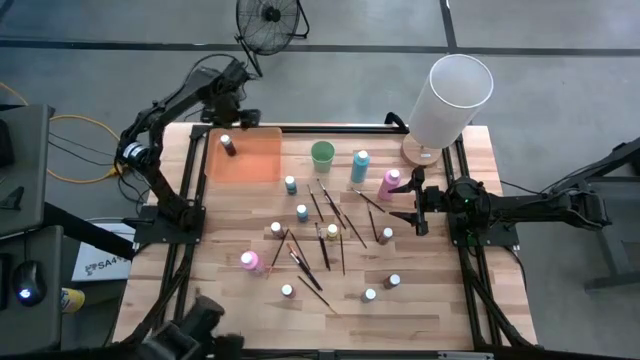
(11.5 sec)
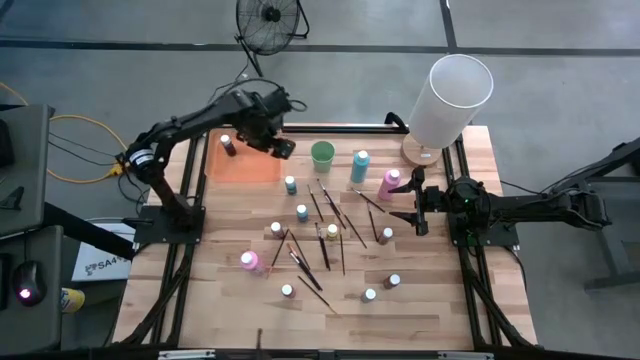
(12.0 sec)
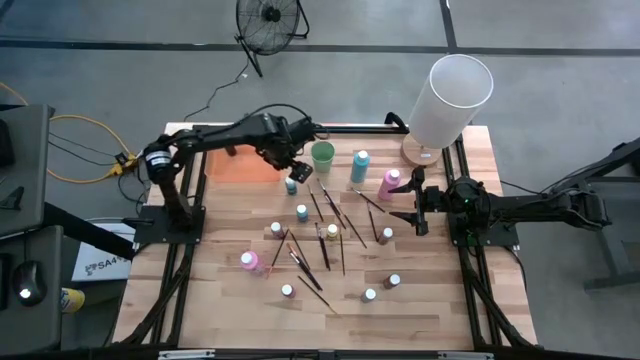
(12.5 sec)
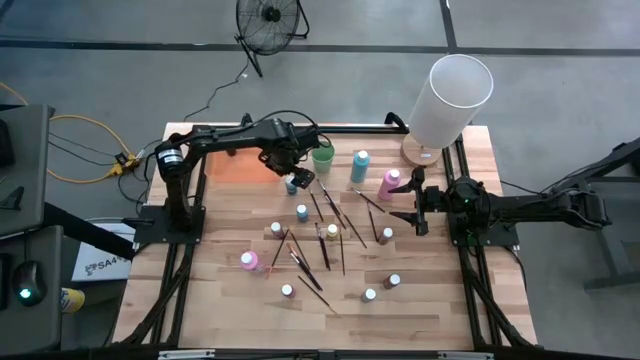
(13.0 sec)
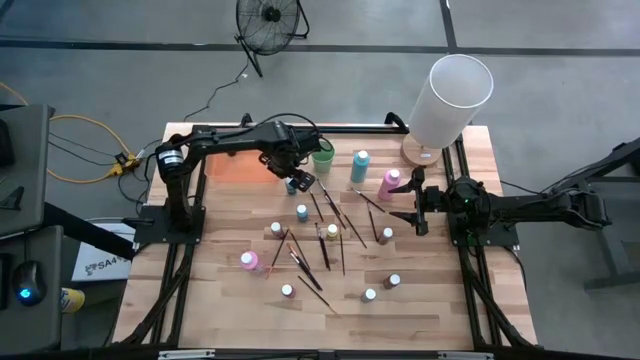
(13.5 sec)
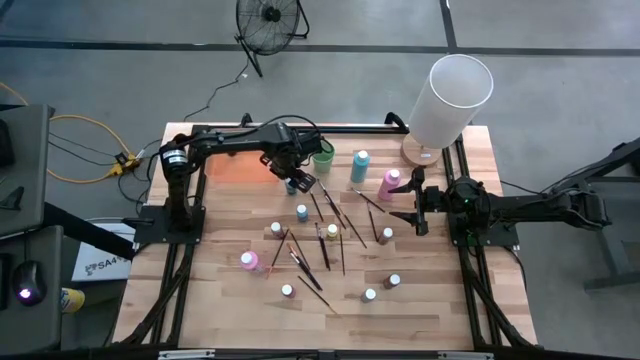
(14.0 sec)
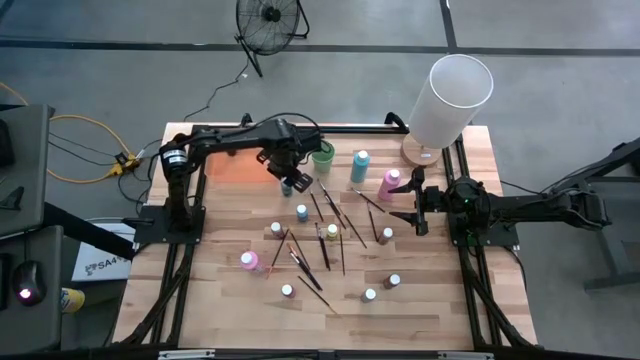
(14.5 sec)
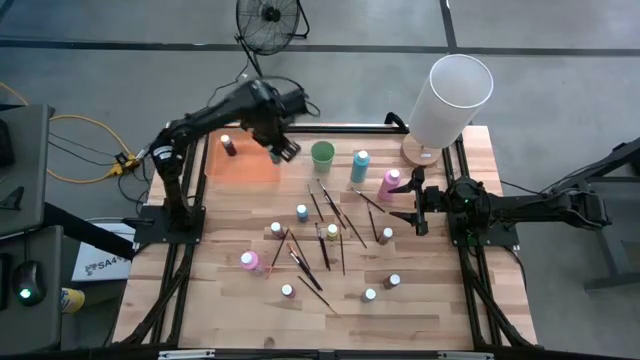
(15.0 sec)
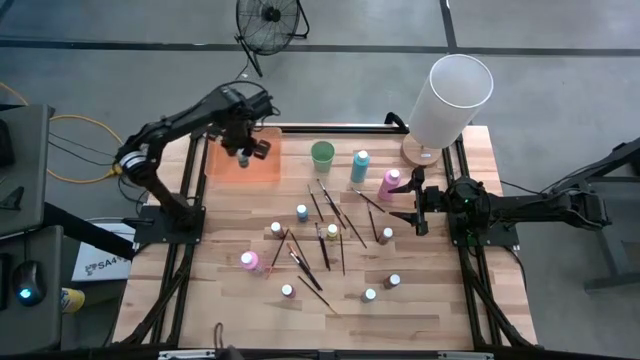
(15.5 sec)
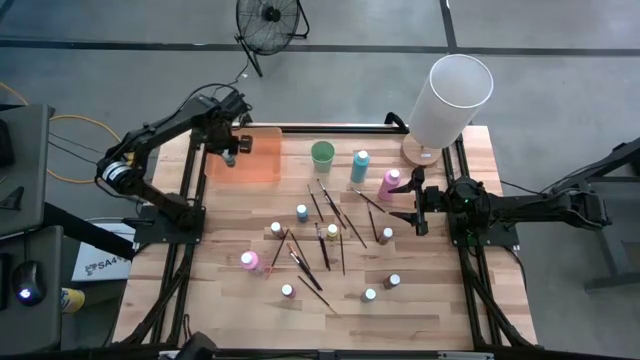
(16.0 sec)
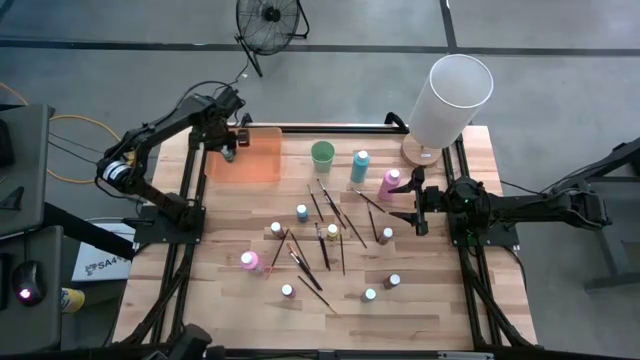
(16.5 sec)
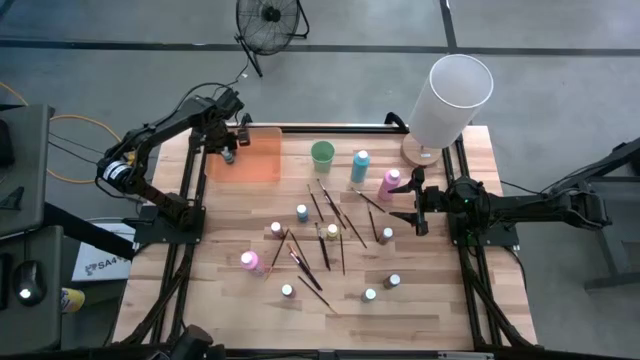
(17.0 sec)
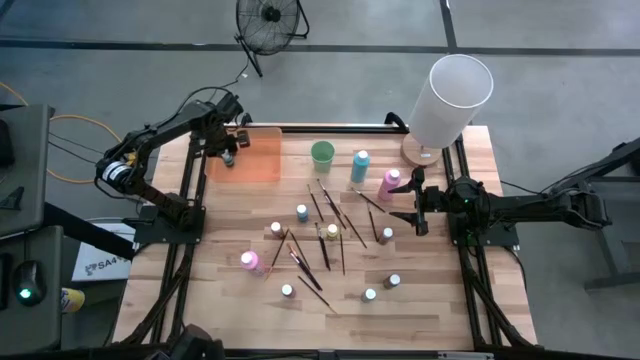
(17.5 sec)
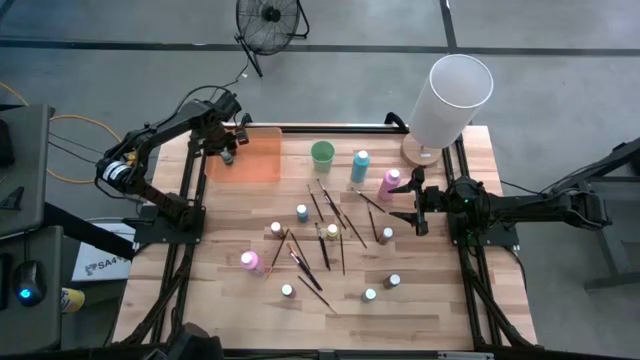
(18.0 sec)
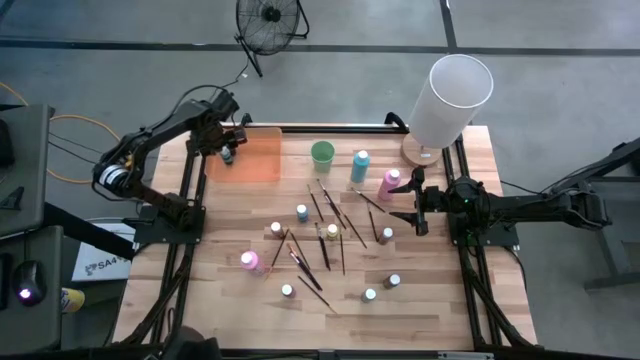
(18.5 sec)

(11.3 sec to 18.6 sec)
Task: Pick & Place Paint Supplies
Put the light blue paint bottle into the orange bin

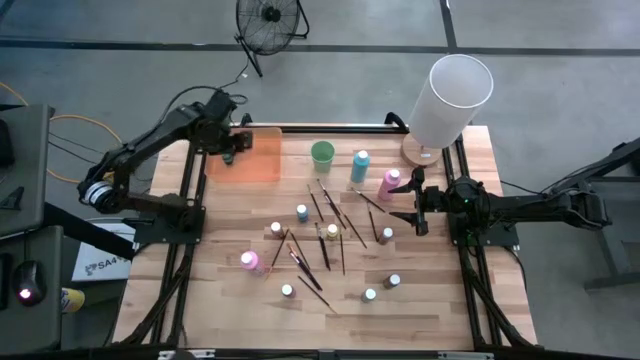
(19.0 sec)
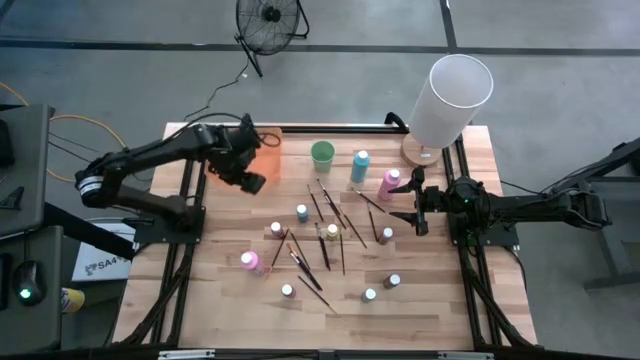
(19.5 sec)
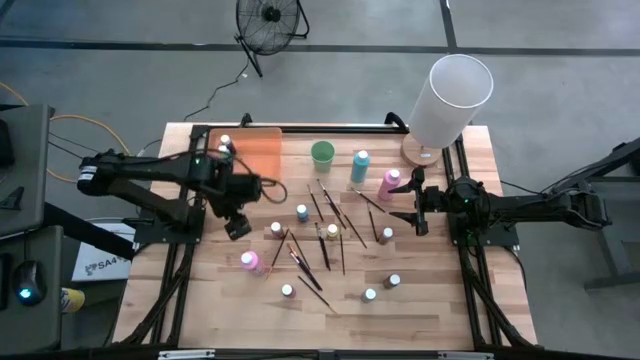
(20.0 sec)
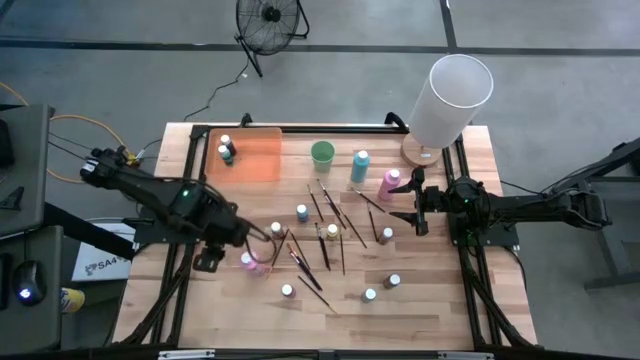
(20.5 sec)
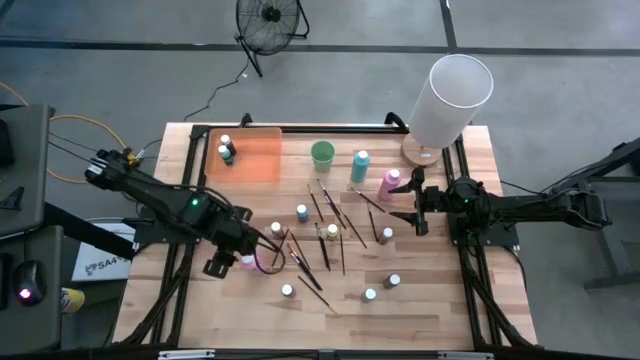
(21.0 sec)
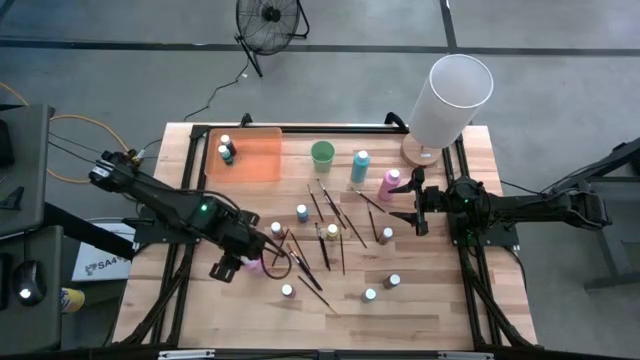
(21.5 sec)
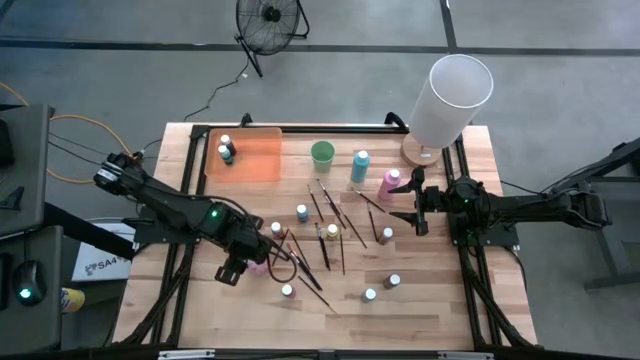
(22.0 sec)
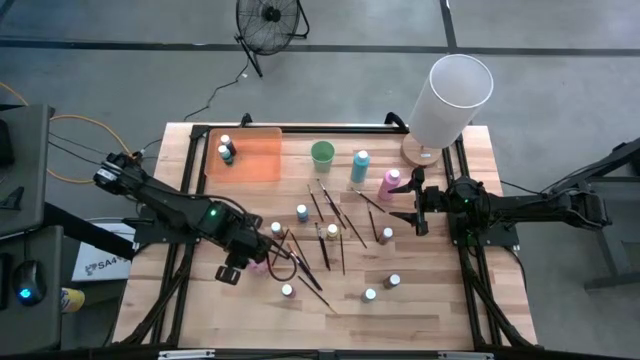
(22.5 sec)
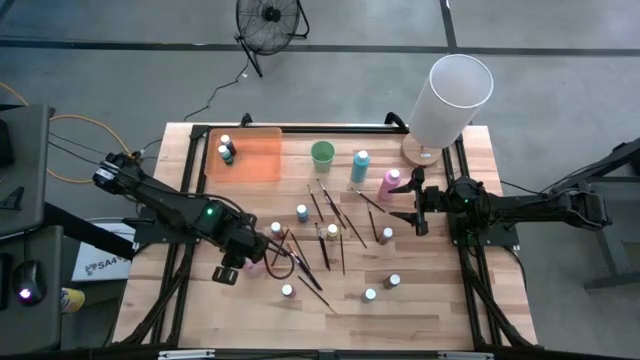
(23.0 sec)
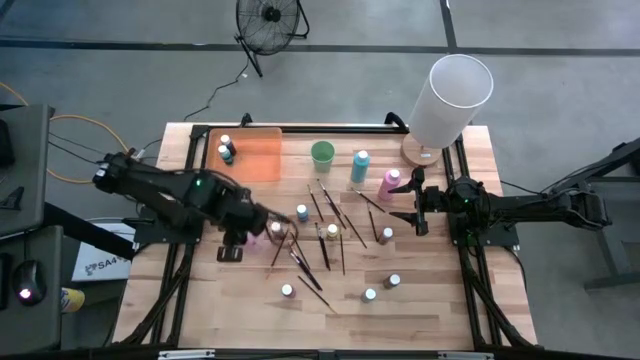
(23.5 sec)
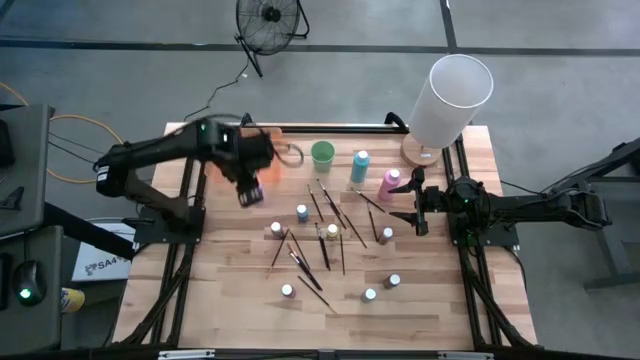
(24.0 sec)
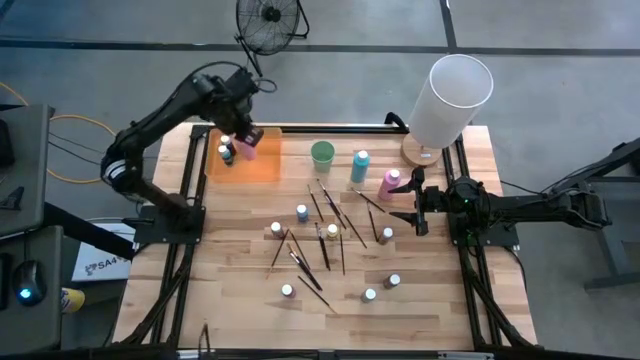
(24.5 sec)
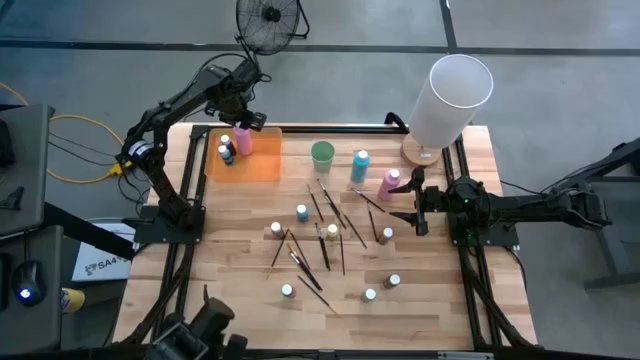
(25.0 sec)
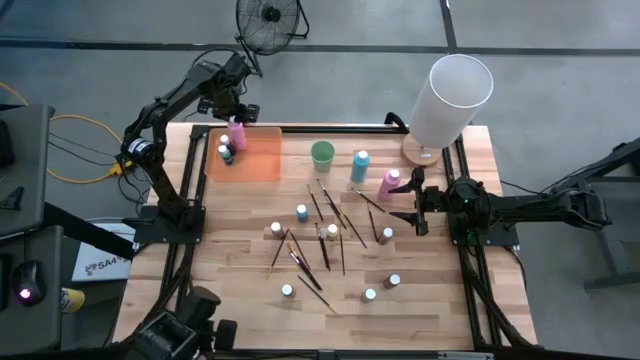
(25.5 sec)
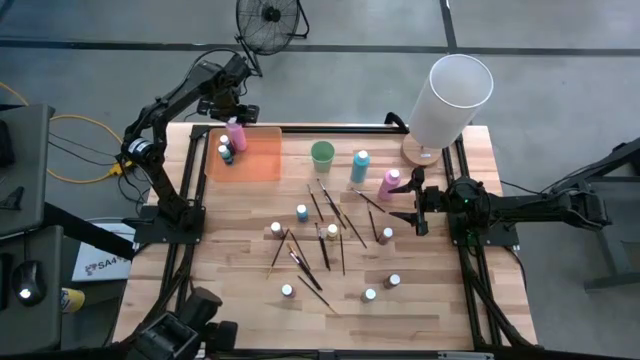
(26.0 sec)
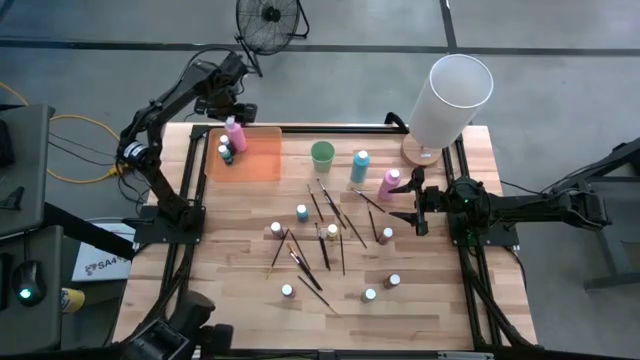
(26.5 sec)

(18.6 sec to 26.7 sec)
Put the pink paint bottle into the orange bin

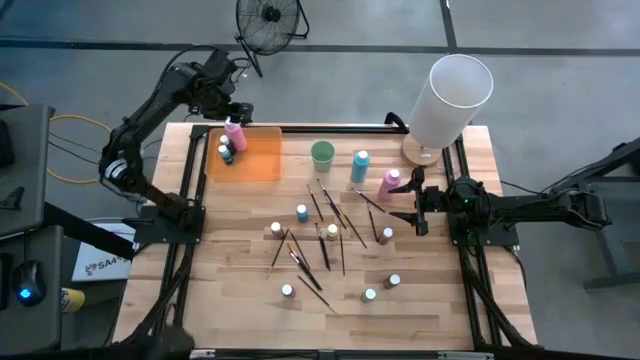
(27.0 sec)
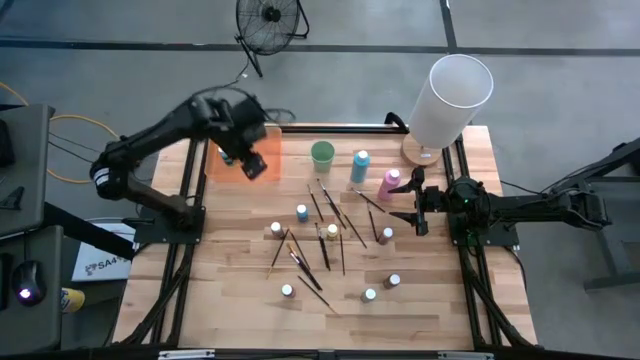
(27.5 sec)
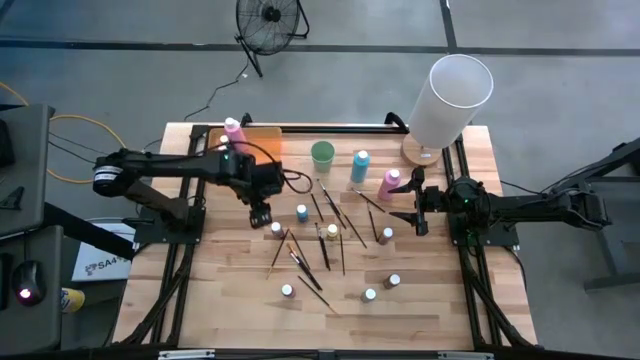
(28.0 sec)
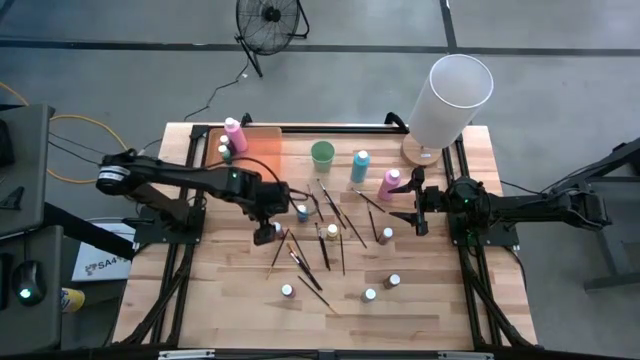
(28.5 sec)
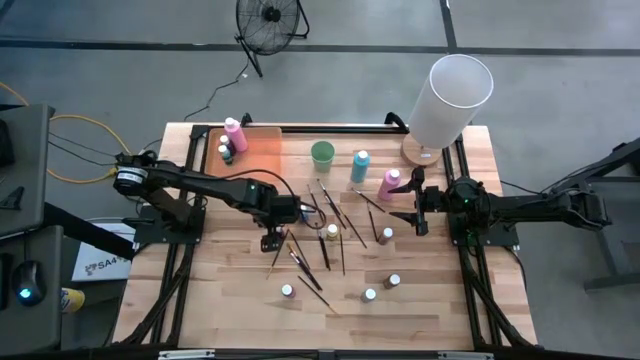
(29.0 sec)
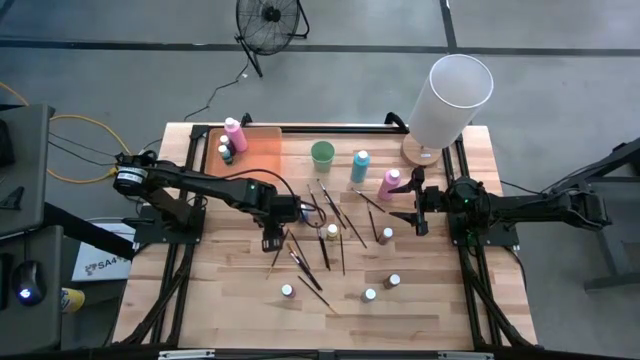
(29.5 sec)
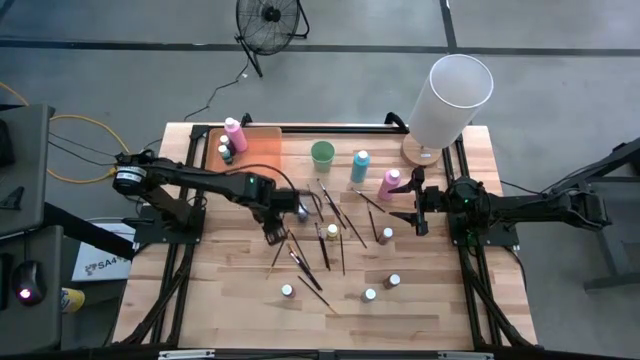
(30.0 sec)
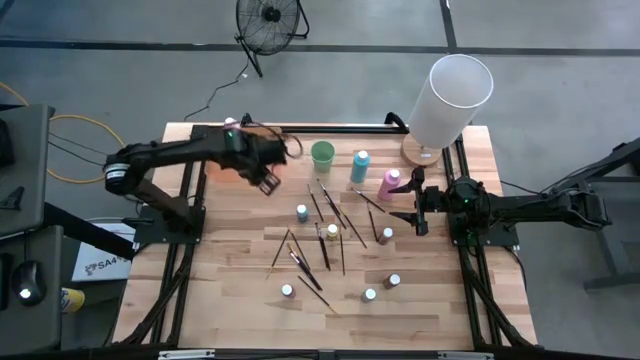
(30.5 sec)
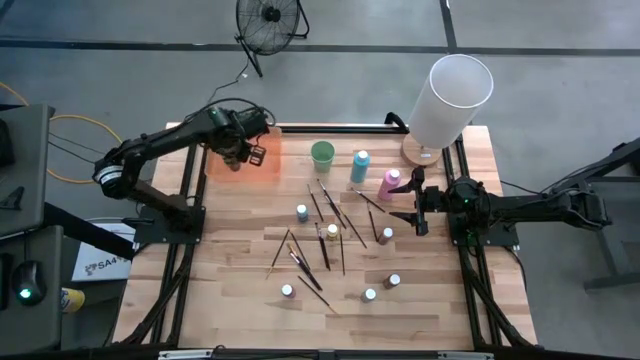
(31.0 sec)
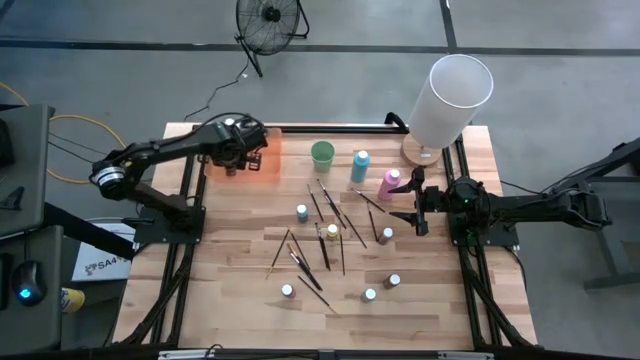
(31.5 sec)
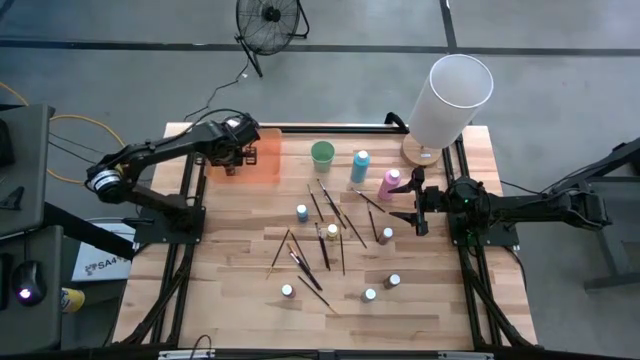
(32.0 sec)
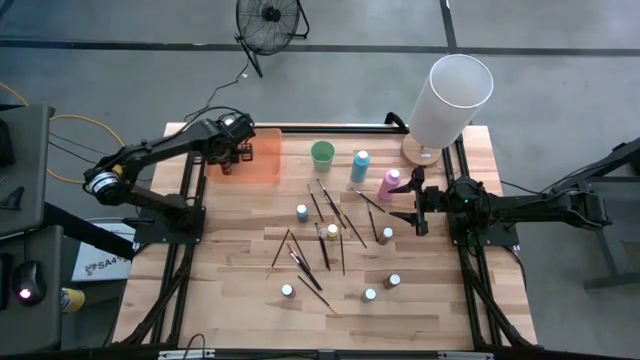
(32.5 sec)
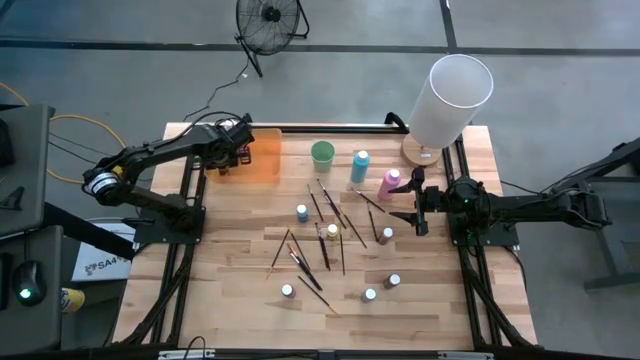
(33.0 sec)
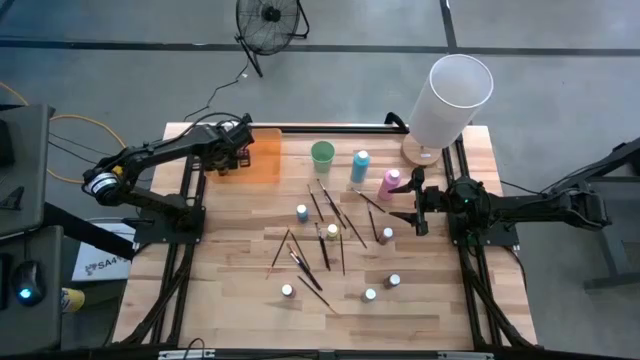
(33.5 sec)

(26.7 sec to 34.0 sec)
Put the brown paint bottle into the orange bin
